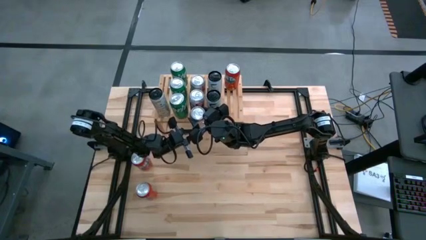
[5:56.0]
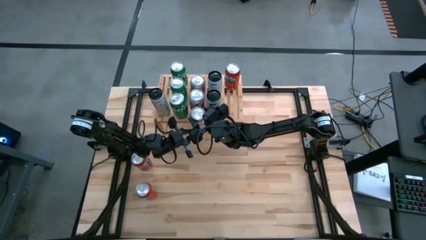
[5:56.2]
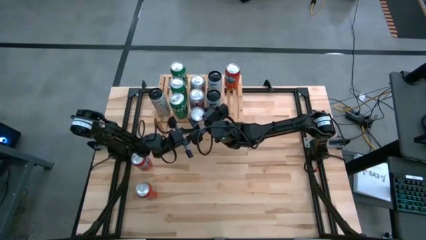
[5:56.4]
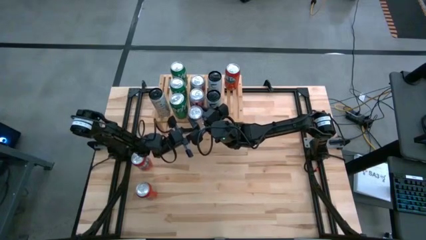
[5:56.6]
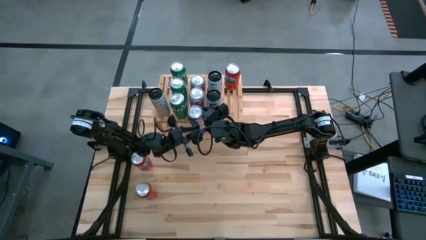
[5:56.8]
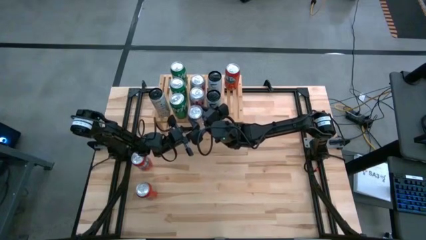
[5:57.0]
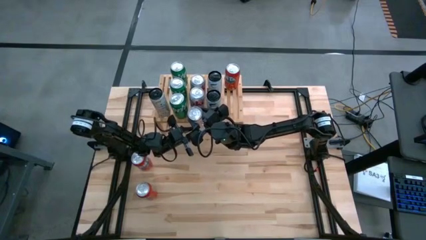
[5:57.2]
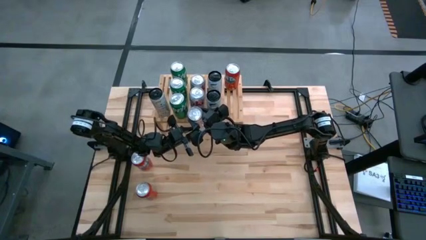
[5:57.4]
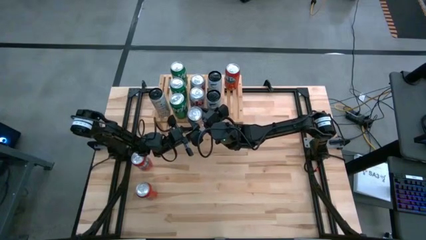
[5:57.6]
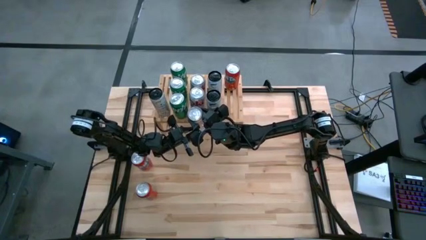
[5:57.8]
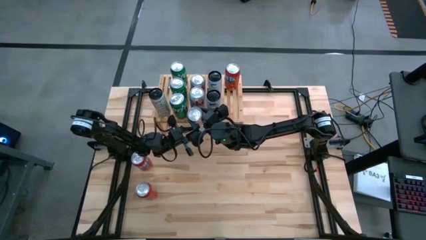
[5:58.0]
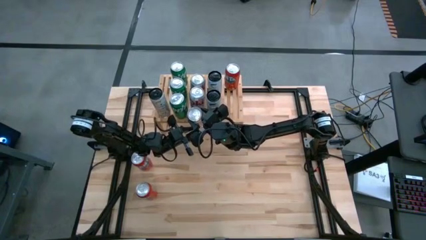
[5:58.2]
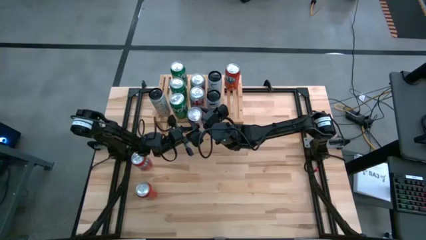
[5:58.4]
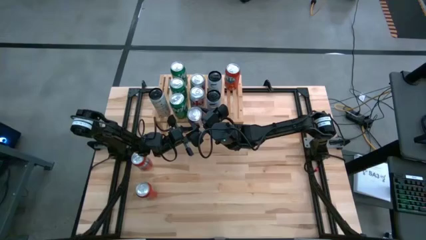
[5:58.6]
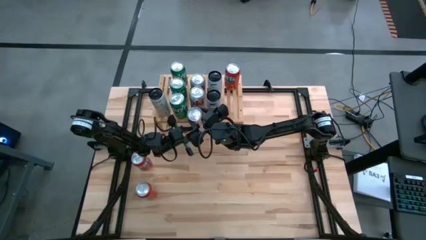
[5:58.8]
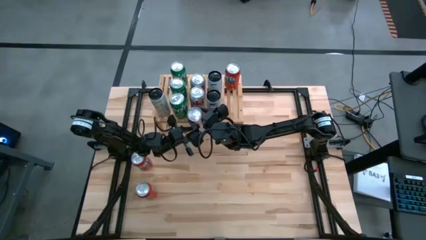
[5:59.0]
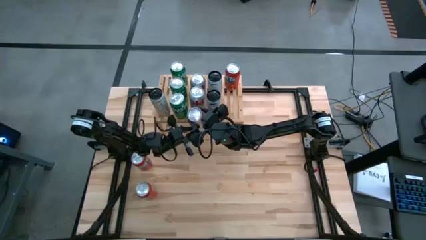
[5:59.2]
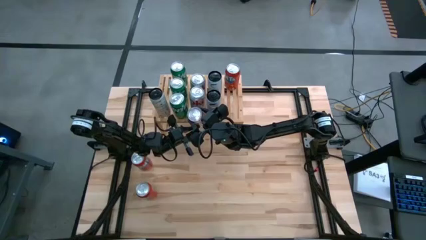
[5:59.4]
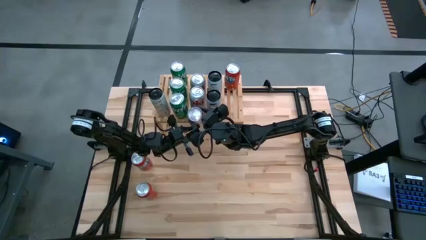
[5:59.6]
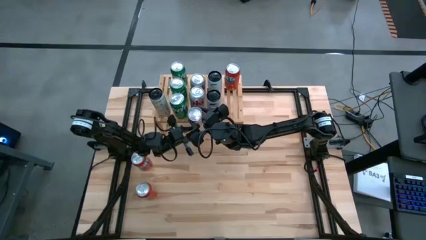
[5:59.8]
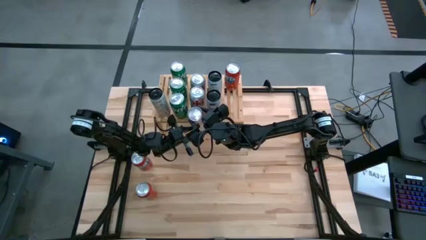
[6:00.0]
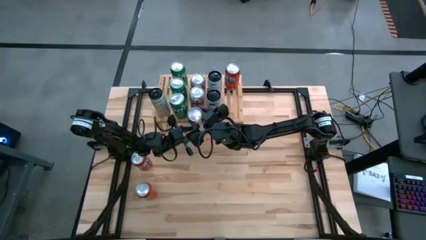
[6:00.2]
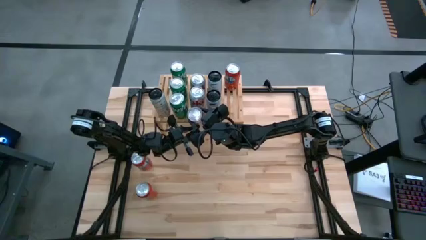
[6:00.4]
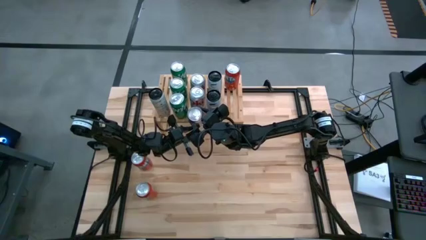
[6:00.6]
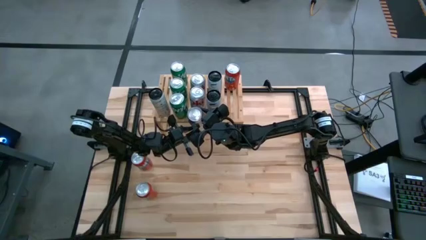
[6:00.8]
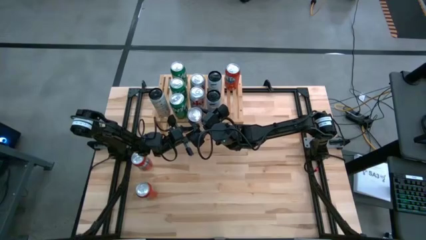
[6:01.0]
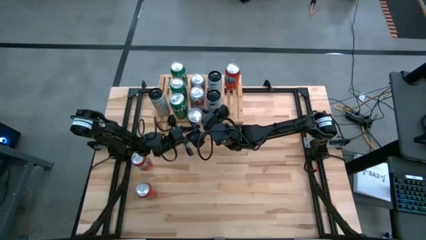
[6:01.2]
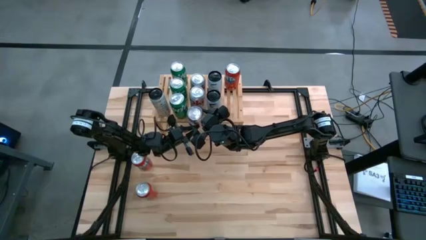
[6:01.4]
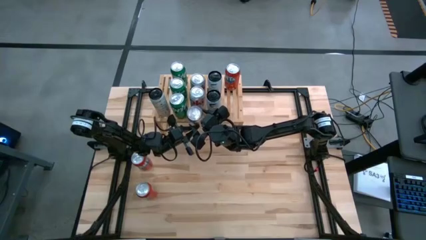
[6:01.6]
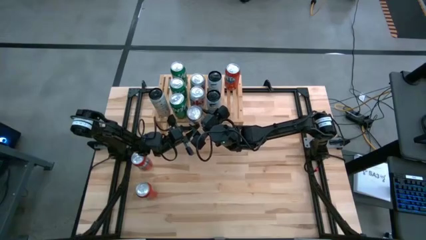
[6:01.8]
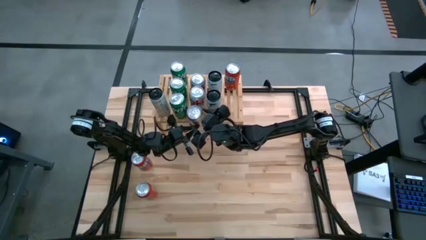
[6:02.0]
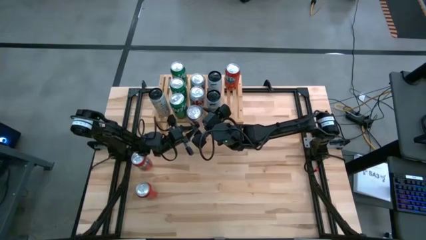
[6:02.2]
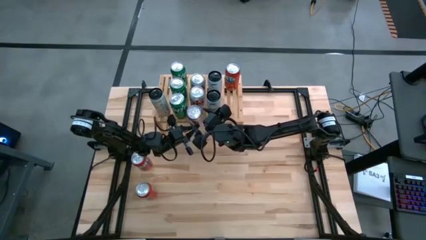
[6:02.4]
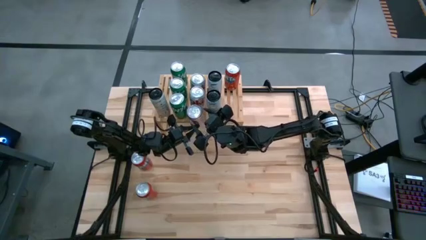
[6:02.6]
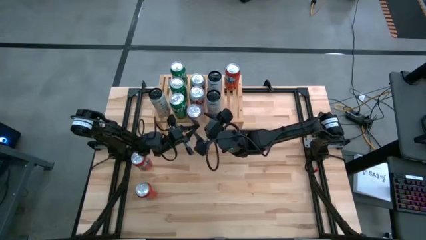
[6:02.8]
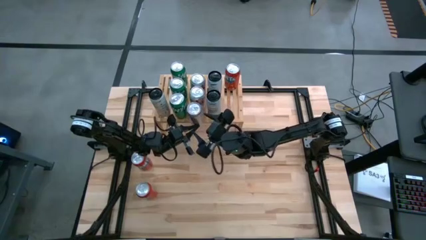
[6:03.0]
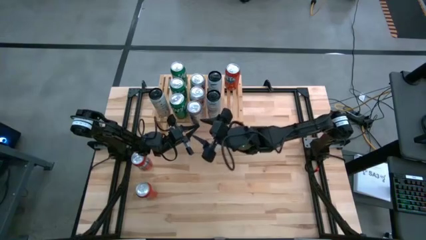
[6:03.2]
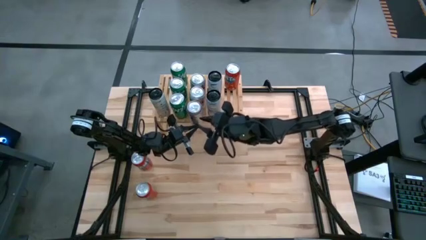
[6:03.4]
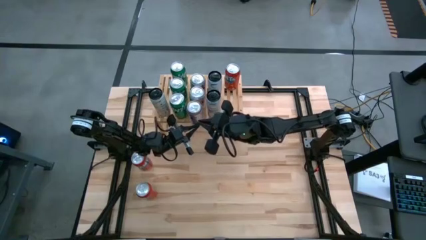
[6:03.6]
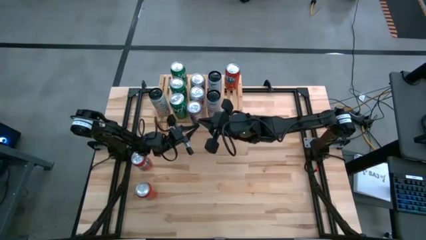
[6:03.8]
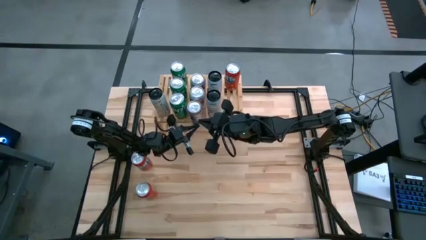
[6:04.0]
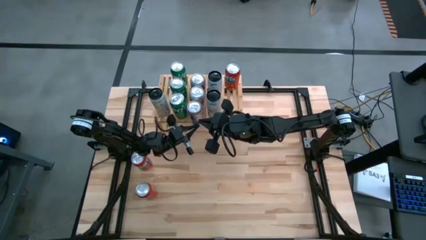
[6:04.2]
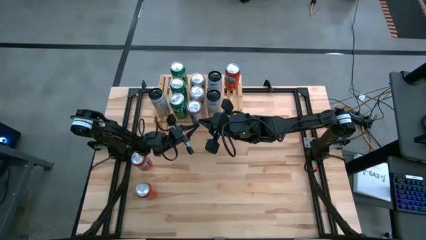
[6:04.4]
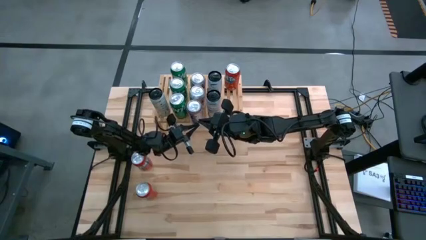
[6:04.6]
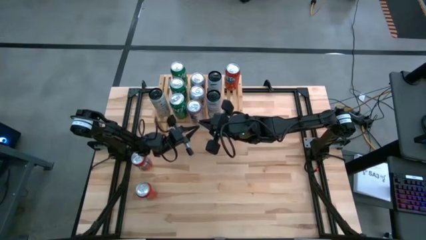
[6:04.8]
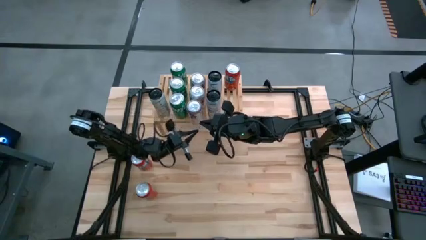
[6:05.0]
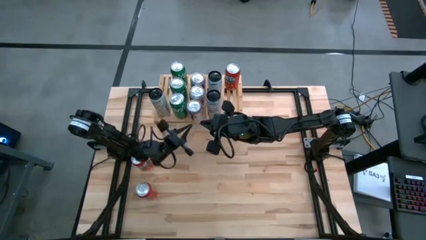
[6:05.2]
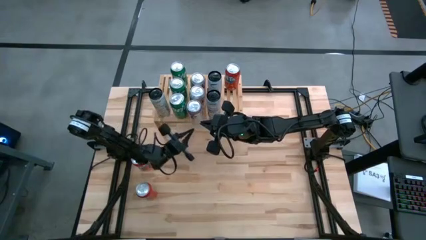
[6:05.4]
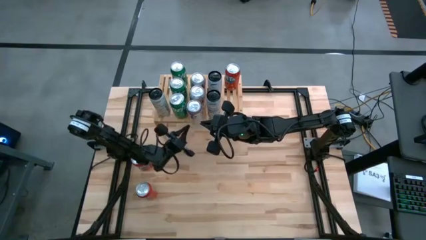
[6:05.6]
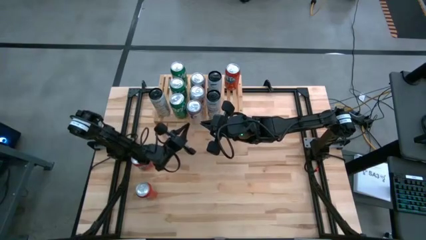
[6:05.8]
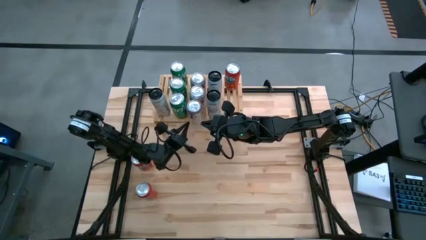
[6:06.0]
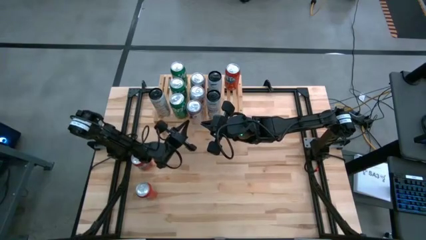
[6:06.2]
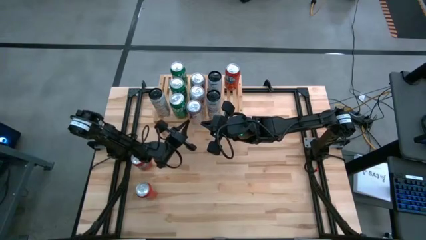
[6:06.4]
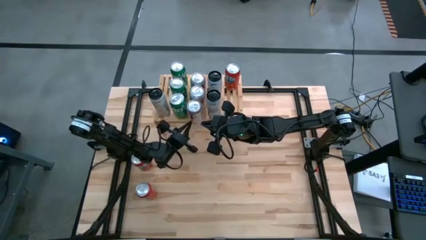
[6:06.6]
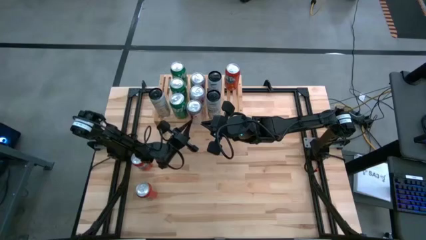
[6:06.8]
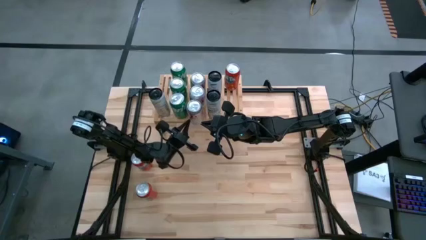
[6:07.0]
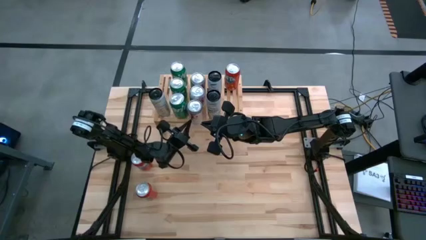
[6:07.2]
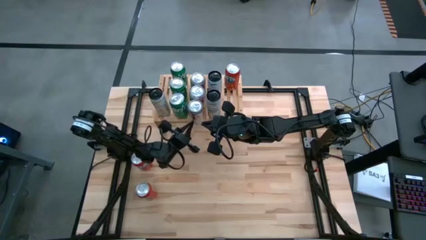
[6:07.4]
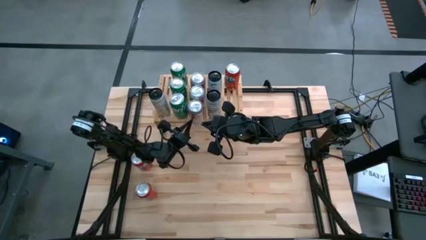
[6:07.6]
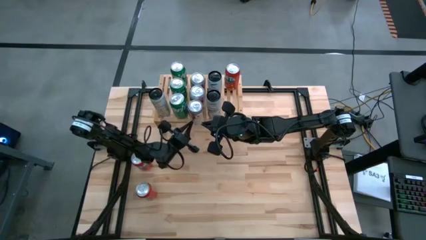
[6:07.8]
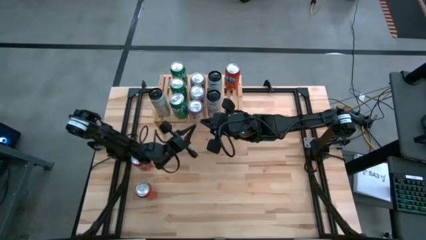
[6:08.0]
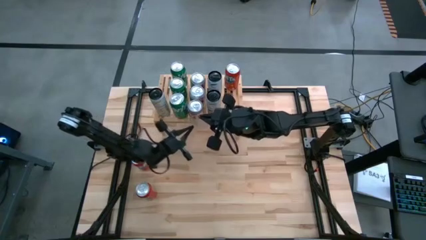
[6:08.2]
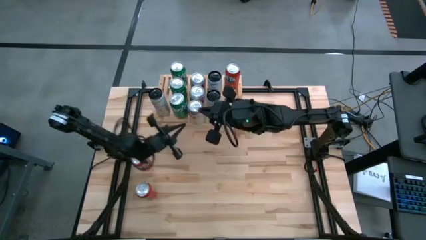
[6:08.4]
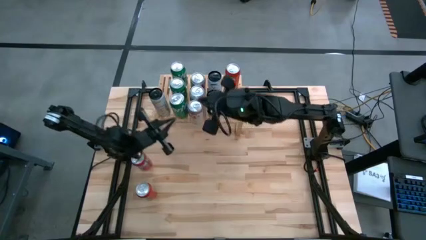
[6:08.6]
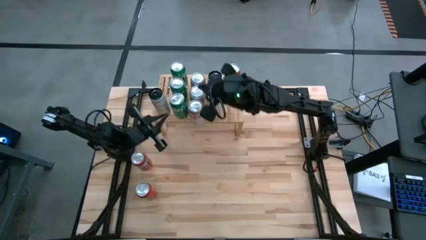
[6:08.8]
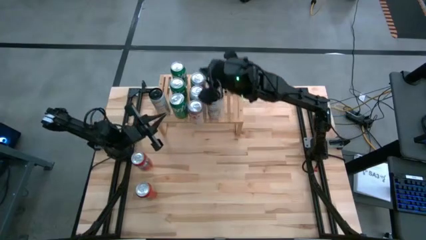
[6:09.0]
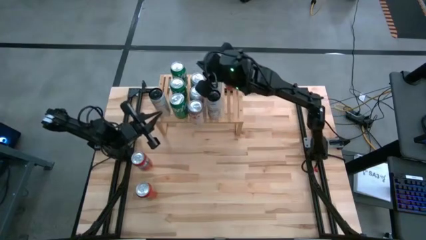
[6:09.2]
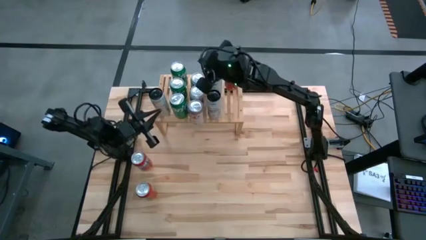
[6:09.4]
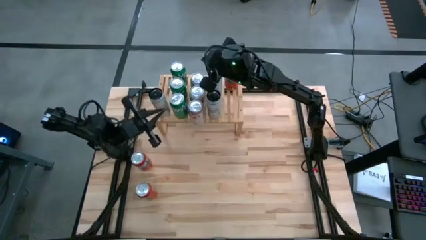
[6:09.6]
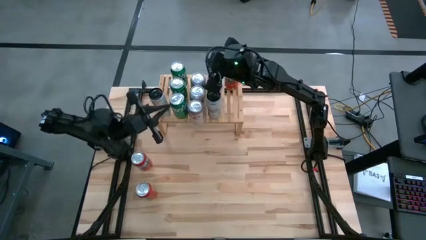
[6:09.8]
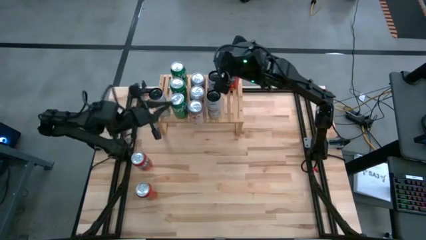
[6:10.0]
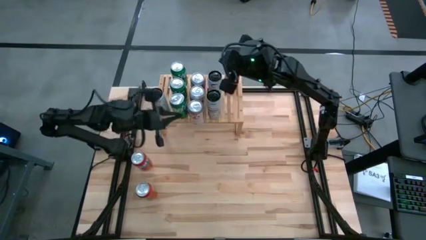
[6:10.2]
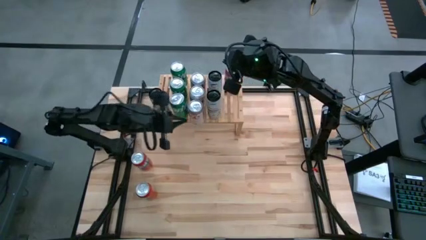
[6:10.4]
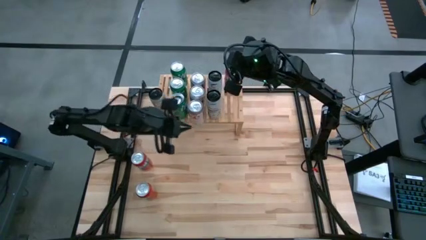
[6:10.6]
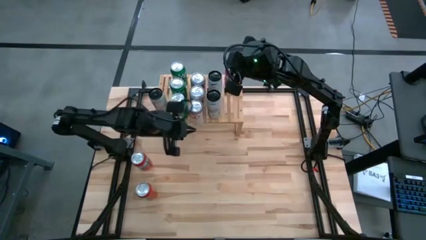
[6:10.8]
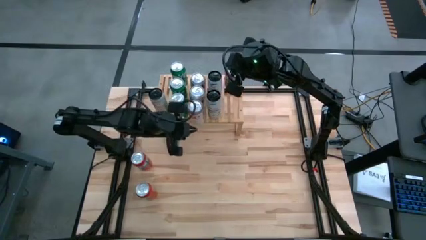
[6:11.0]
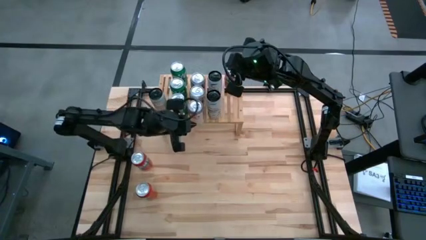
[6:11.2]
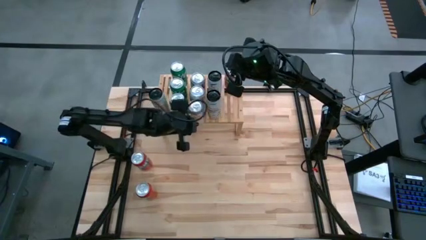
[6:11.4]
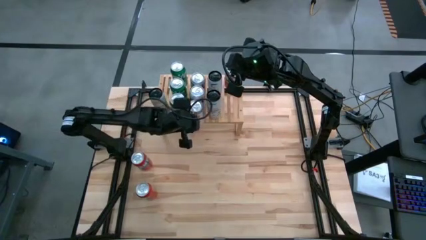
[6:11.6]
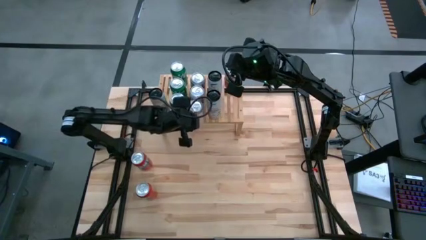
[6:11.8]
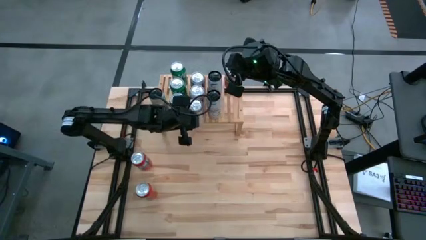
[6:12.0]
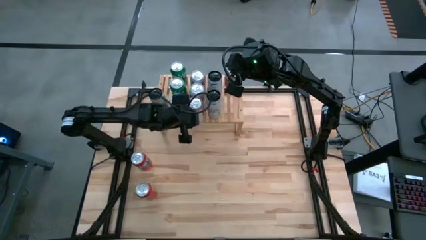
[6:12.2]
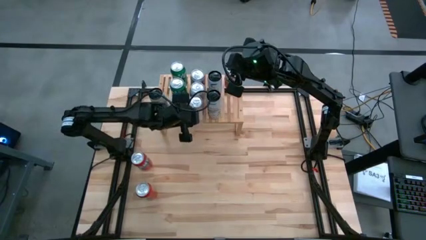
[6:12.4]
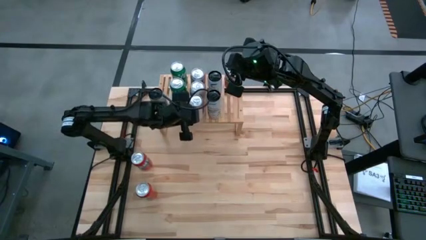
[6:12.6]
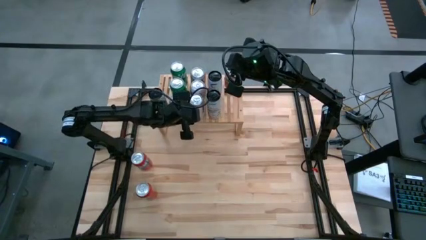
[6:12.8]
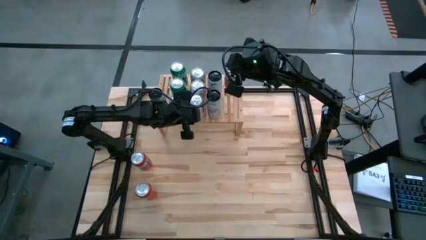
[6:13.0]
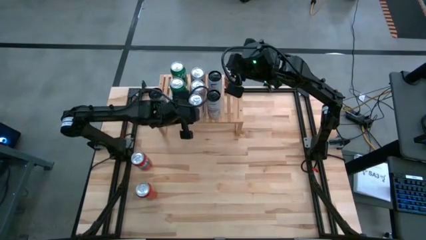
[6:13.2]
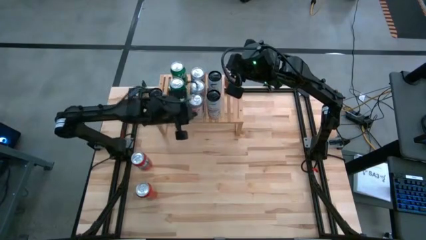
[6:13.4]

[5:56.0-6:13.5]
Task: Place canned beverage on shelf
Put the white soda can on the shelf
